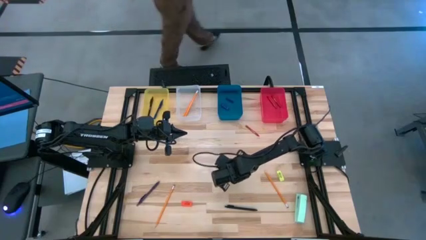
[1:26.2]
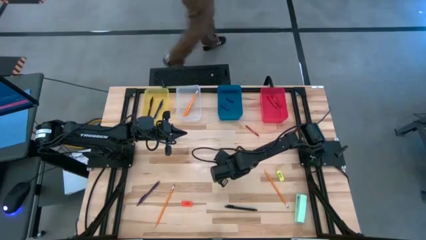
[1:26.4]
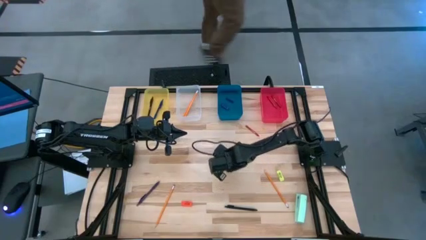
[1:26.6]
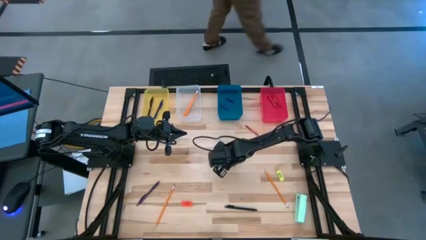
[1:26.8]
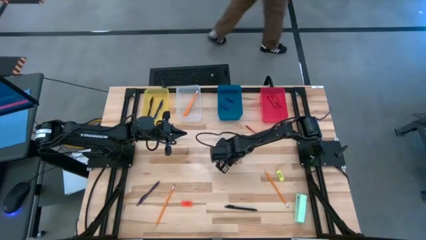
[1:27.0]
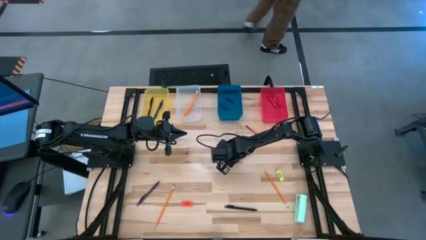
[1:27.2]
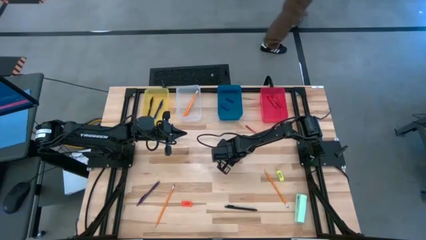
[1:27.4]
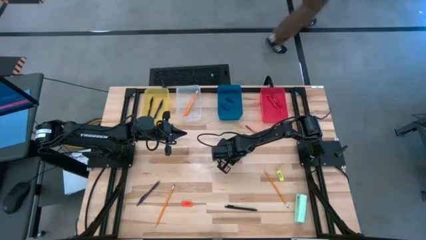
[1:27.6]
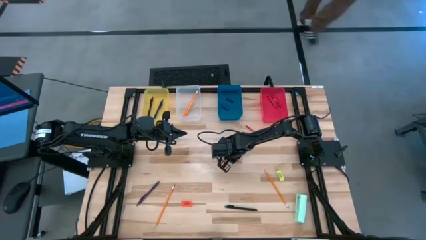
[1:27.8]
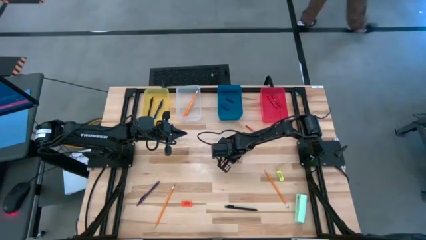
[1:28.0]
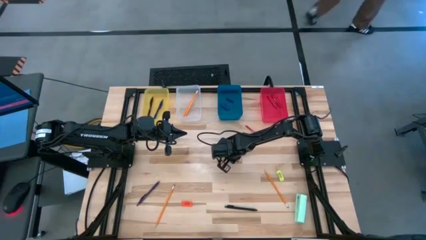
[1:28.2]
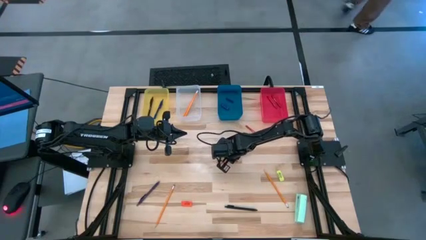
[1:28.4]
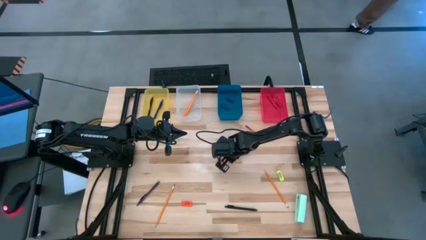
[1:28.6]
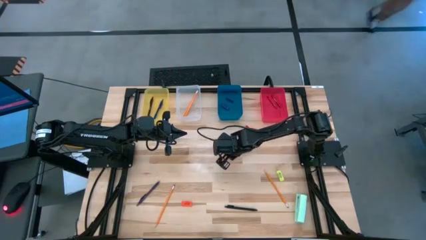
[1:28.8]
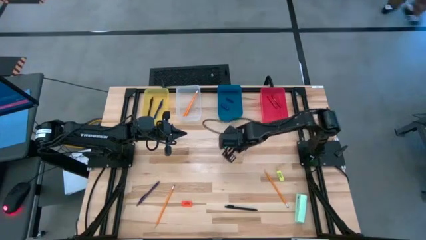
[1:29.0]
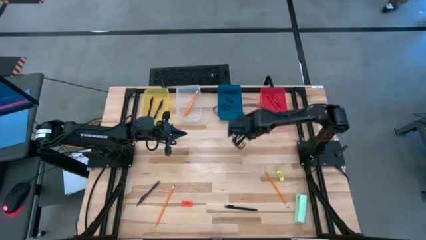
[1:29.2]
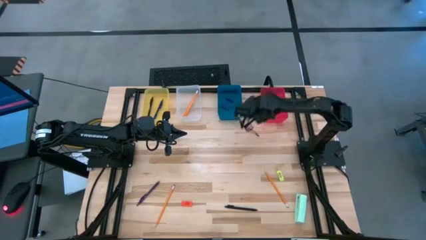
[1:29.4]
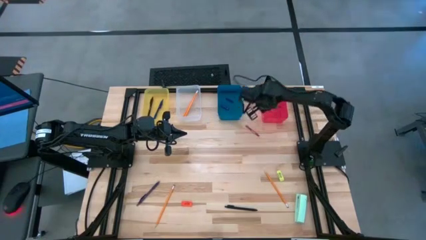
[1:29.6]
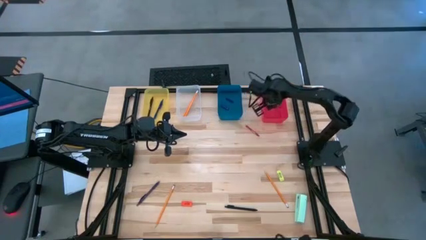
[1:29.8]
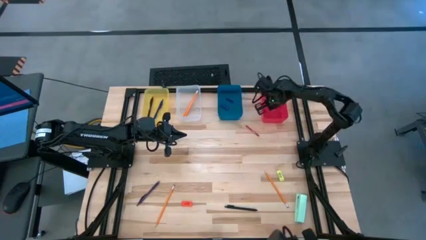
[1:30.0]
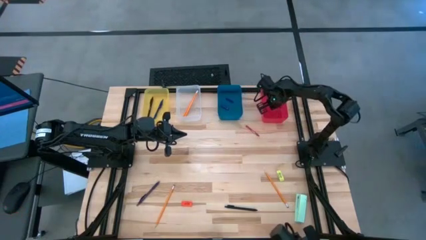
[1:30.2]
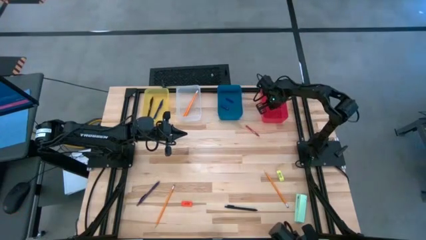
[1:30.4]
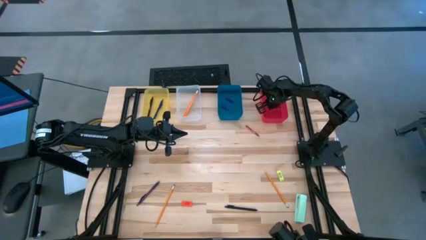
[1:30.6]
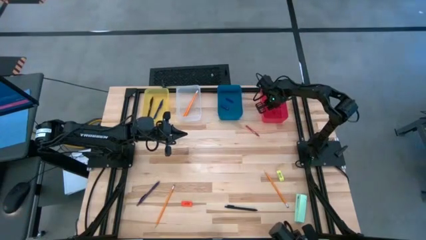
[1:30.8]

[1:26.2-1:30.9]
Task: Sort crayons/erasers/pens/pencils in bins
Put the red crayon into the red bin

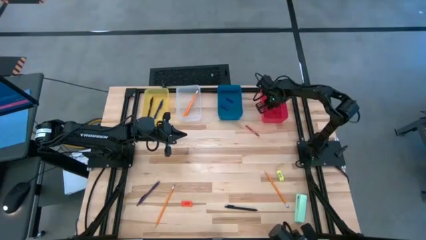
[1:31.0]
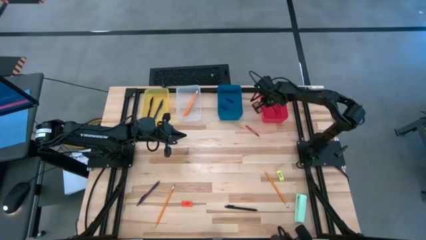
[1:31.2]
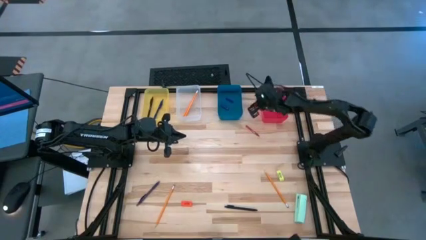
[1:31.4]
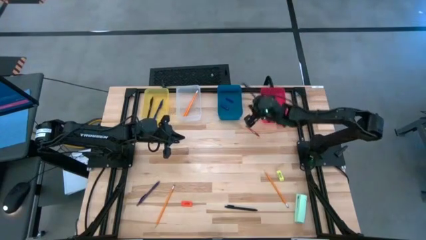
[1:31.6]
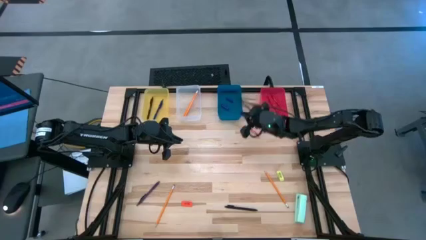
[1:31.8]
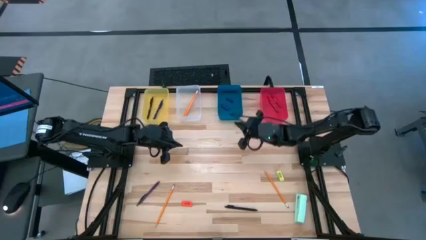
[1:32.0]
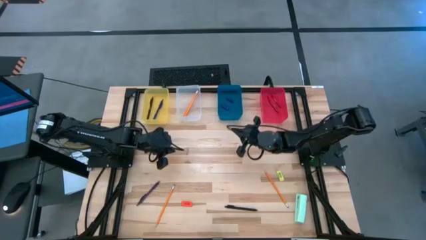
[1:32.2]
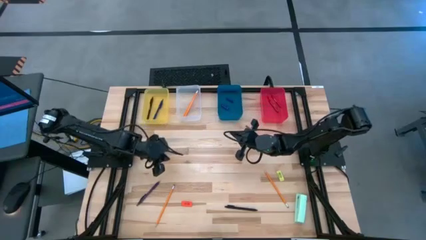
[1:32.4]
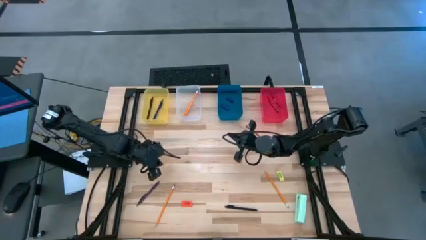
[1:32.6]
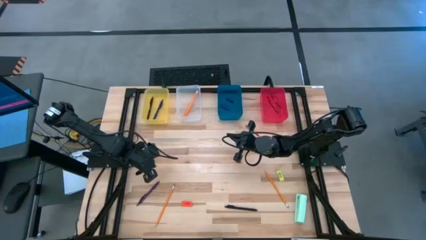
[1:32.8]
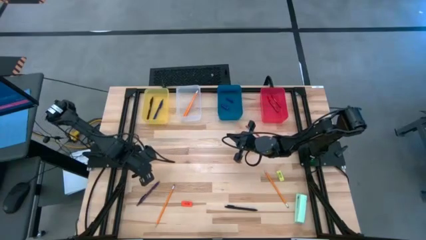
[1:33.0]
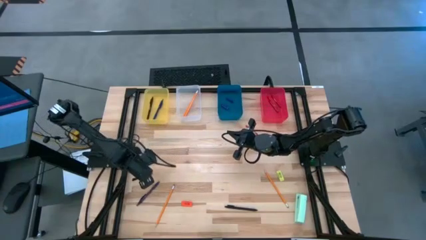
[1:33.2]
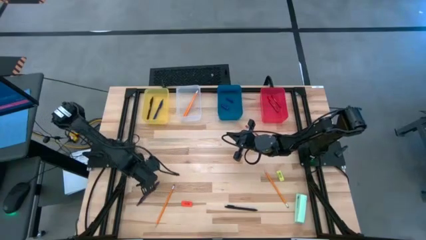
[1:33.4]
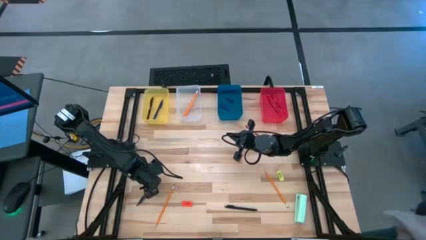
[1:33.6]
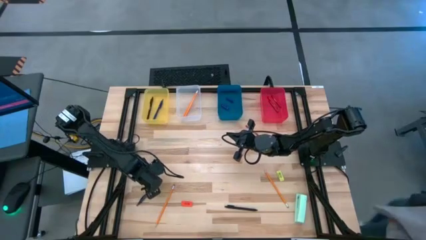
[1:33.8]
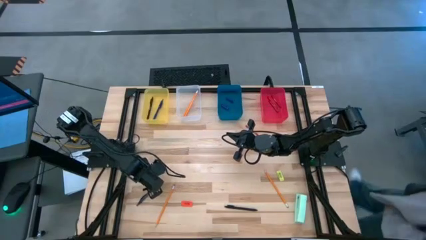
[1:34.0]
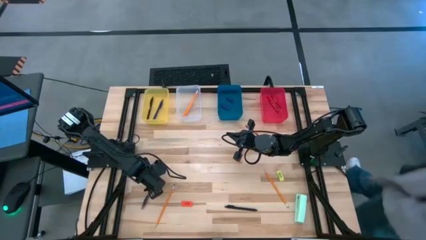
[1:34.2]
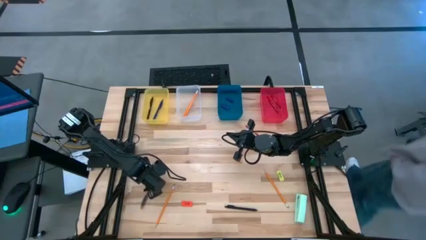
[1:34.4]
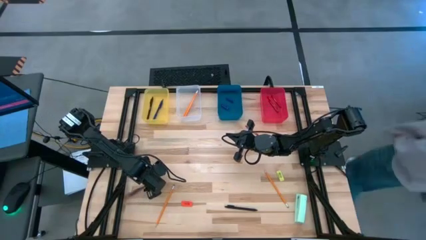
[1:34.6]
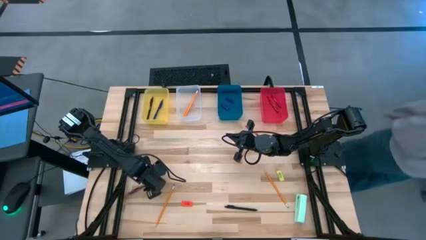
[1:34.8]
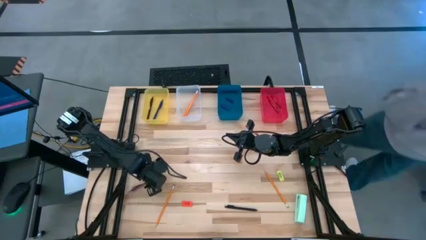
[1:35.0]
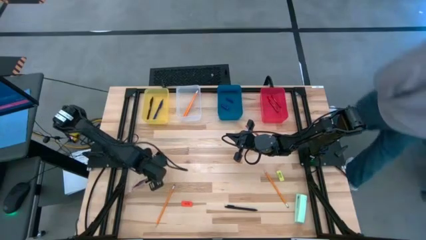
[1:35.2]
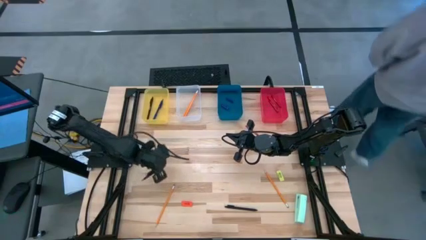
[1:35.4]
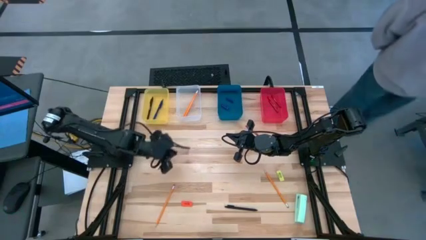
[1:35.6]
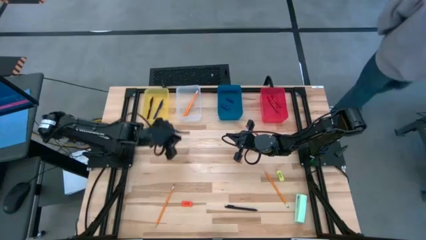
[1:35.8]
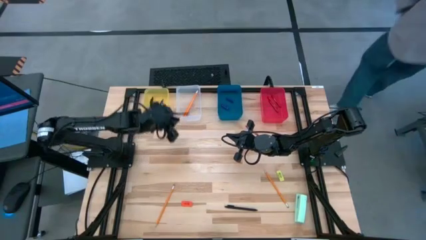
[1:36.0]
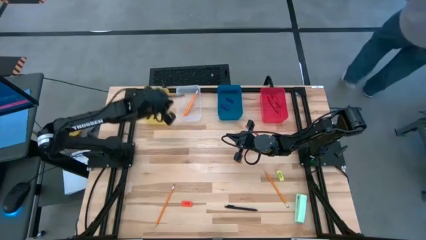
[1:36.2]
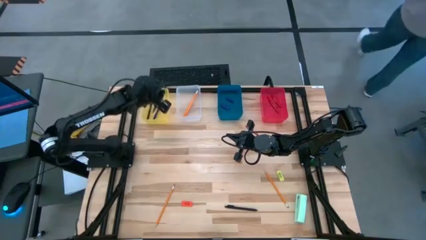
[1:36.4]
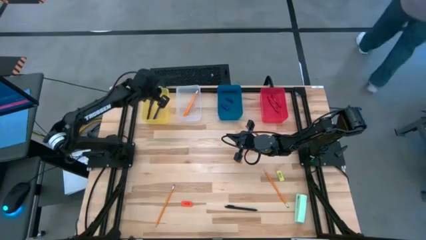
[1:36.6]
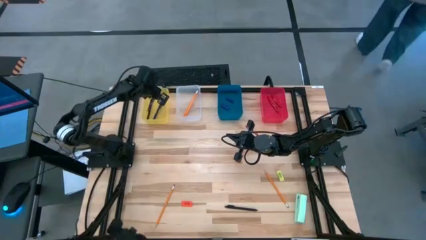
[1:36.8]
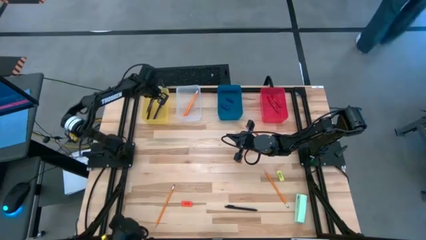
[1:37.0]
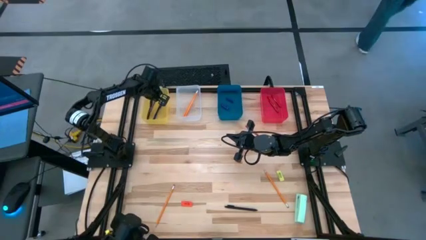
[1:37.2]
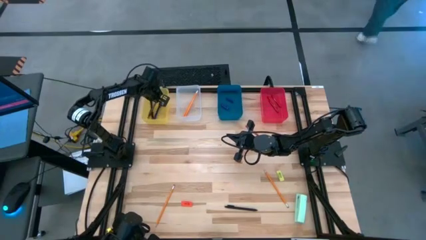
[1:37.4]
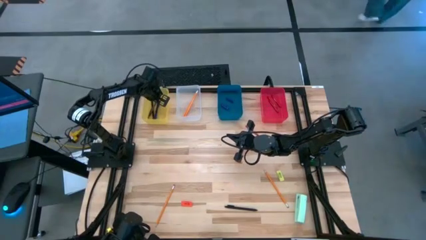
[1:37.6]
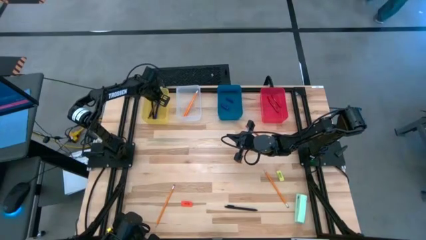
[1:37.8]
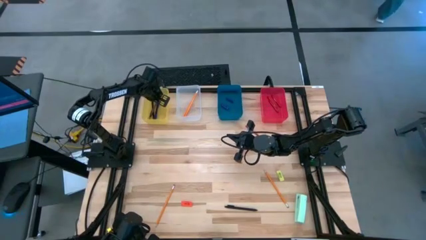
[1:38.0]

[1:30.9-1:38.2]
Put the violet pen into the yellow bin

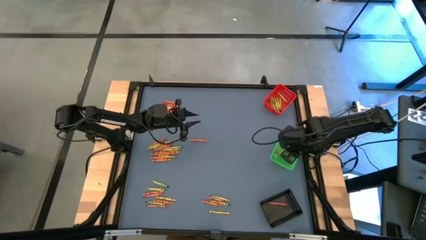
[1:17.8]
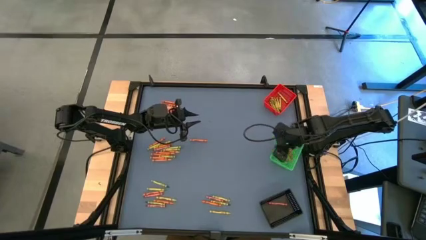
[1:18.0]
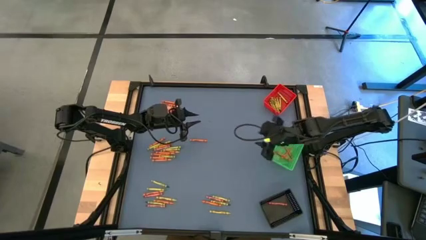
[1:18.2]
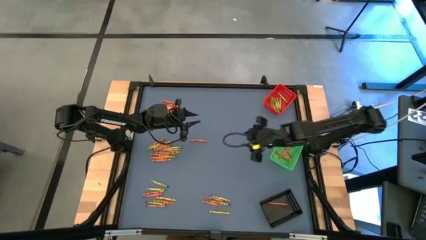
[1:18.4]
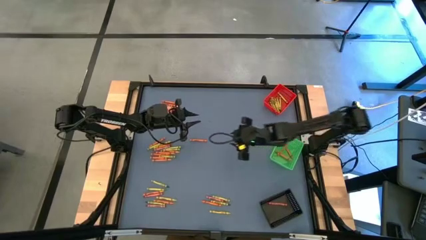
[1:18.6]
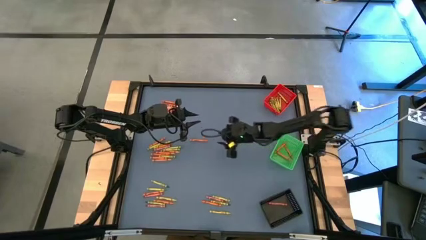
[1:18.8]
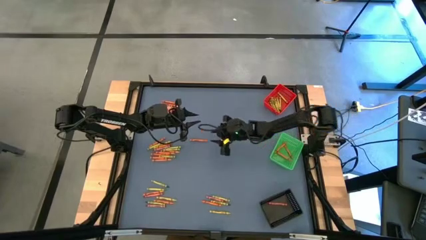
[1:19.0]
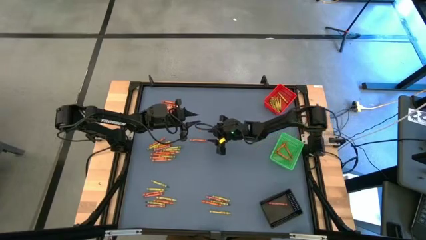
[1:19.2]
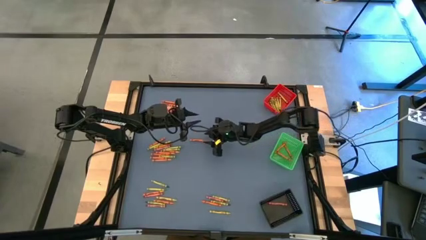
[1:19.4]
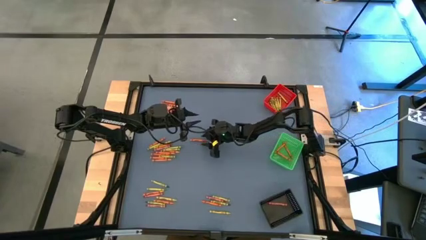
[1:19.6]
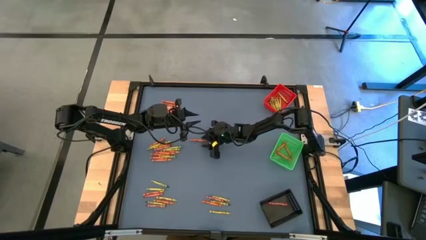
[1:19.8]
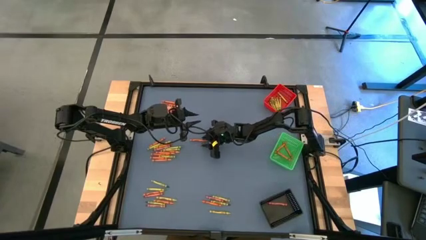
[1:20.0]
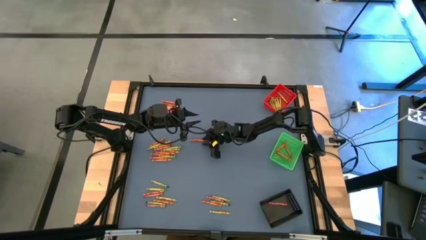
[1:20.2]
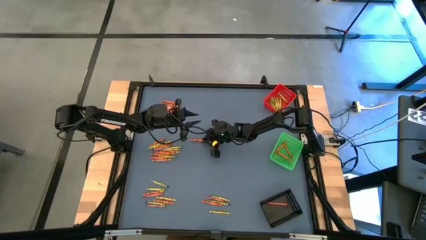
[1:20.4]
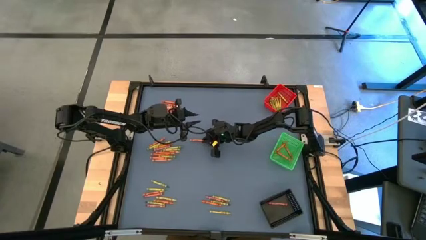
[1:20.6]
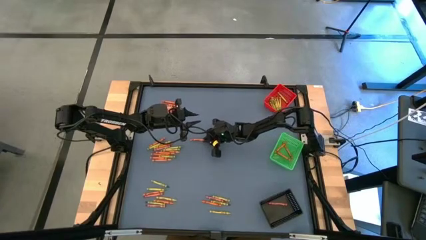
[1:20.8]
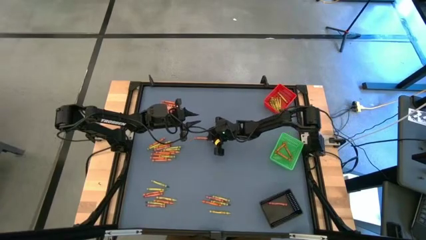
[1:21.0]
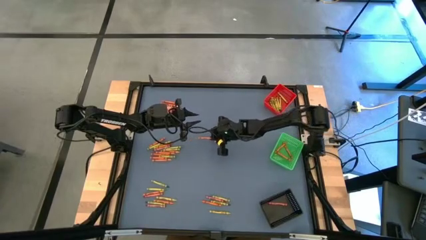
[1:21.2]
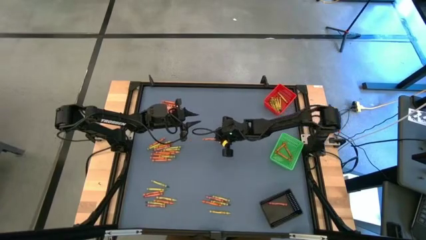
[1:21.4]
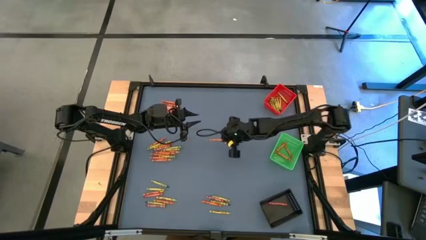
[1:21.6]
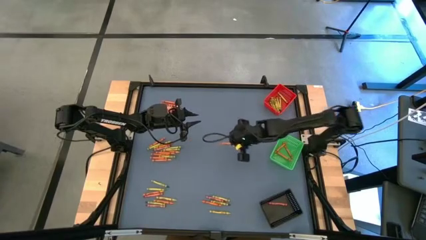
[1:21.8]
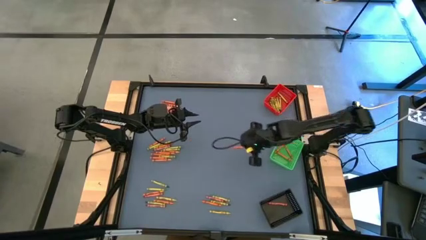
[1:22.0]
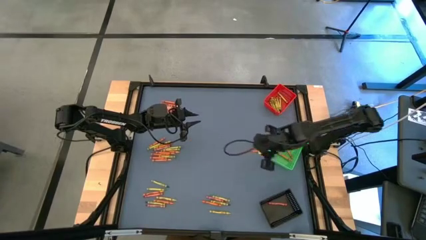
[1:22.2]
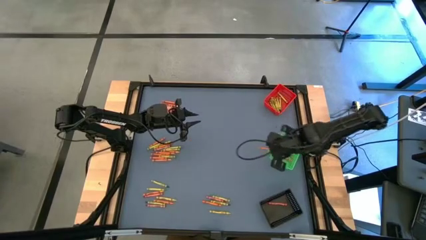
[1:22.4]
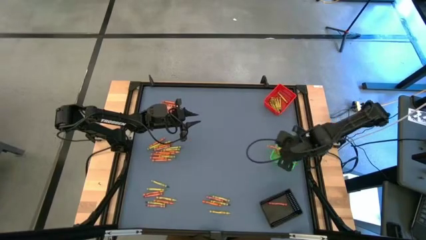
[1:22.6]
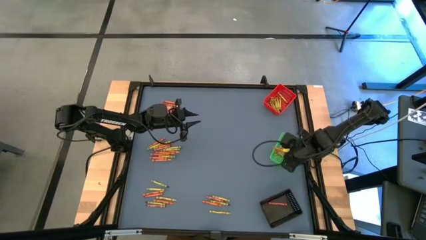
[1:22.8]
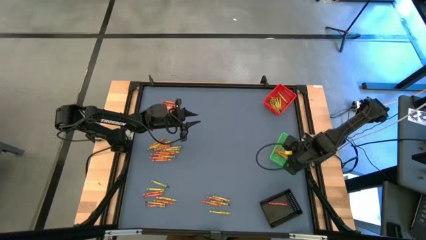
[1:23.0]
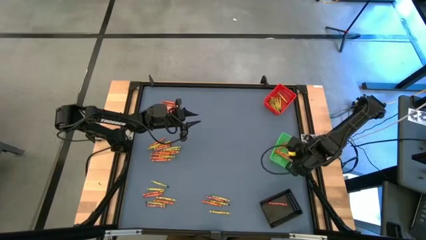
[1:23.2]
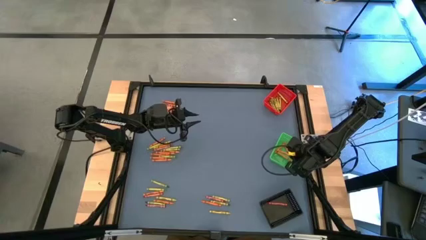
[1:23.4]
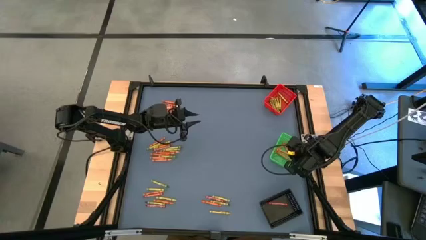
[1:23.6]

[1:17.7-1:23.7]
Task: Sort crayons
Put the orange crayon into the green bin
